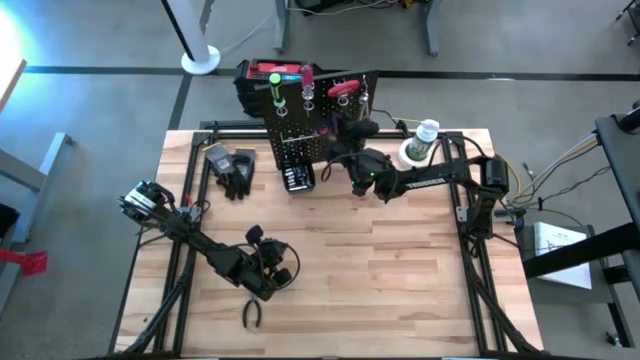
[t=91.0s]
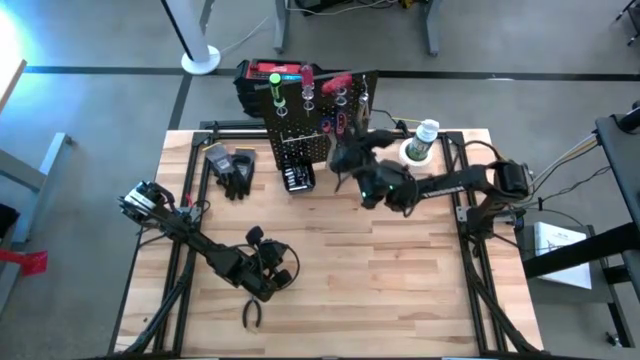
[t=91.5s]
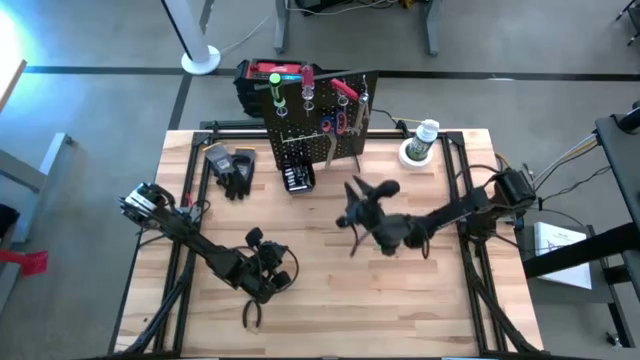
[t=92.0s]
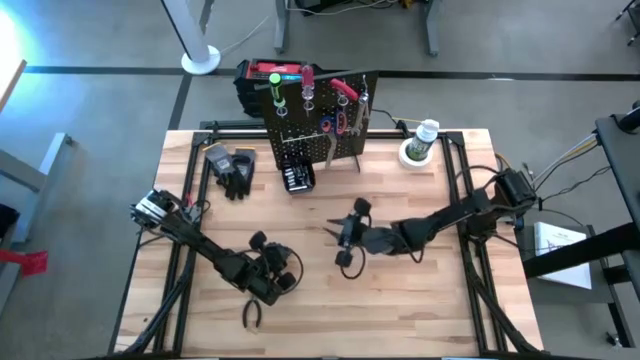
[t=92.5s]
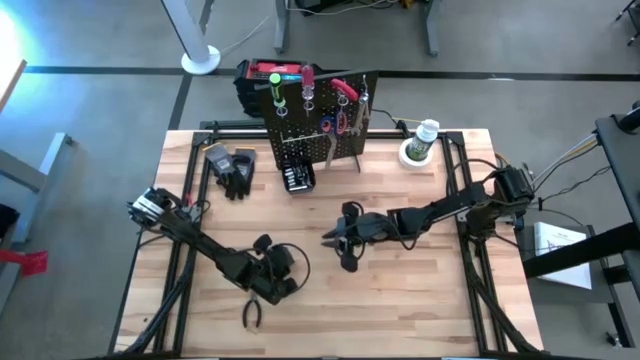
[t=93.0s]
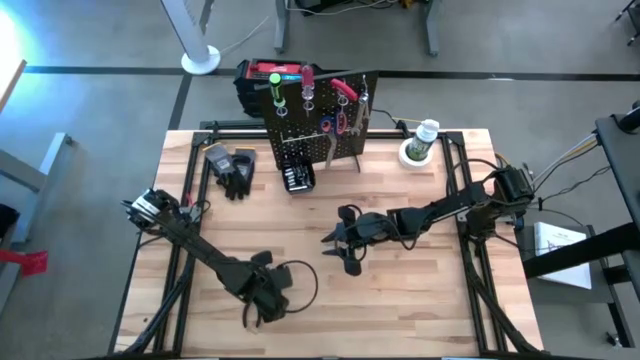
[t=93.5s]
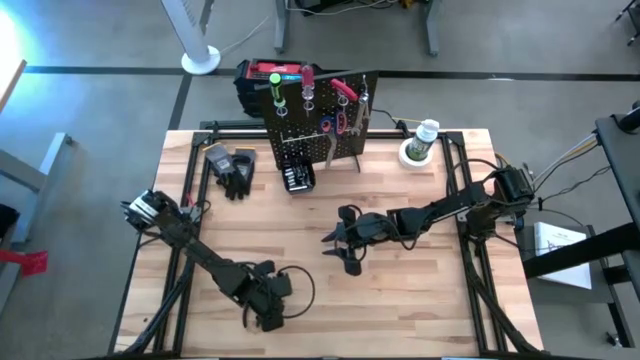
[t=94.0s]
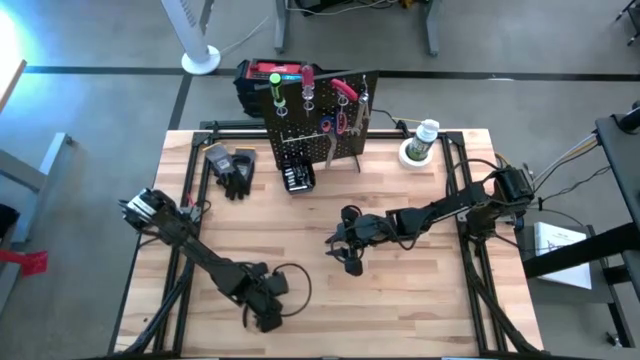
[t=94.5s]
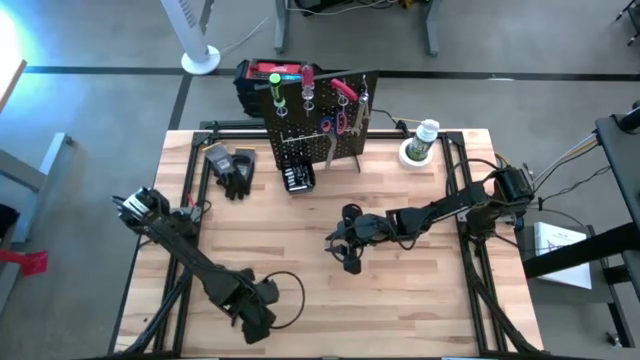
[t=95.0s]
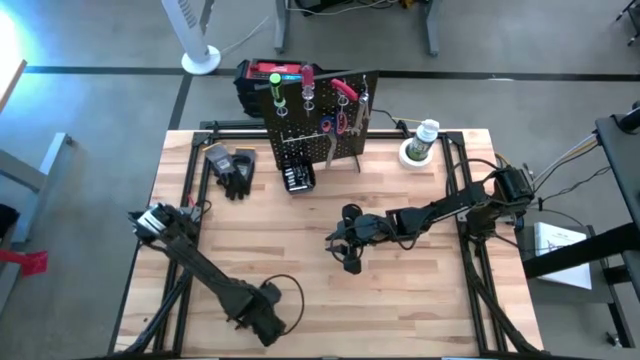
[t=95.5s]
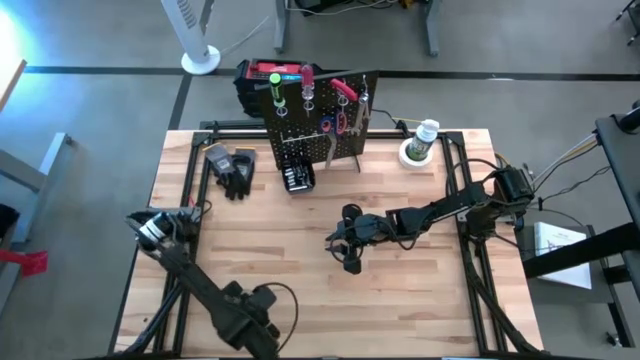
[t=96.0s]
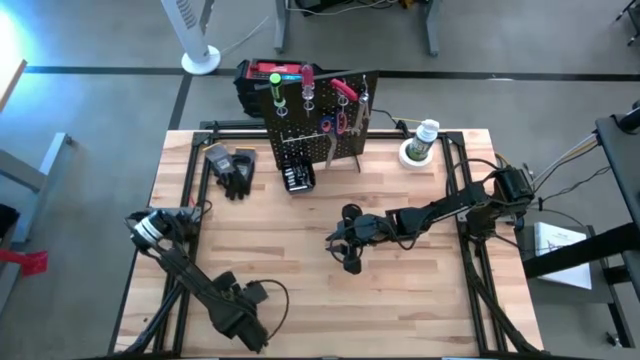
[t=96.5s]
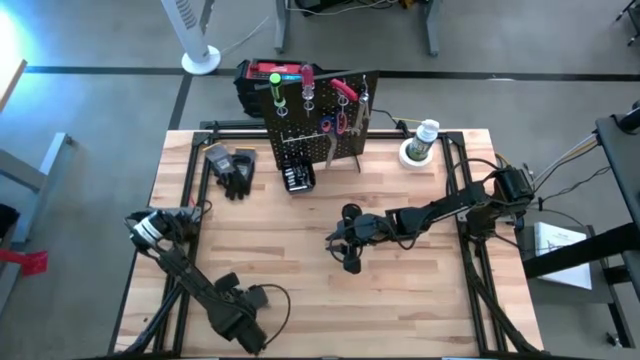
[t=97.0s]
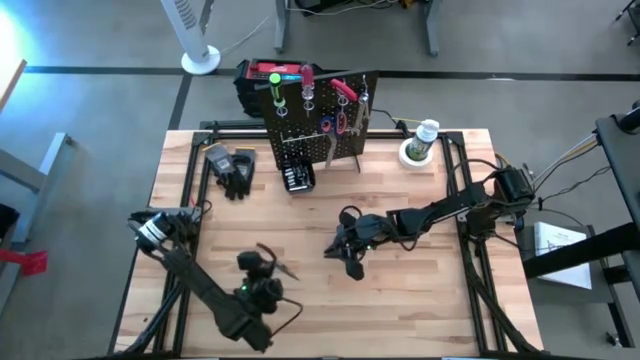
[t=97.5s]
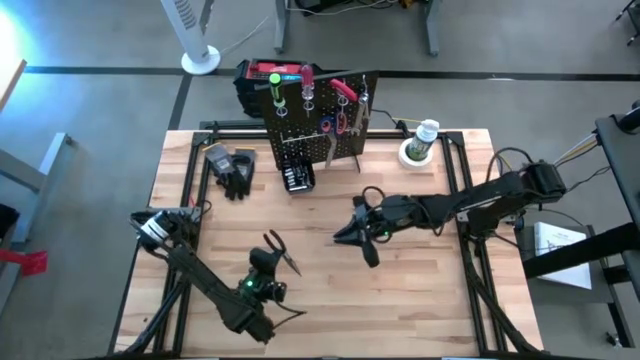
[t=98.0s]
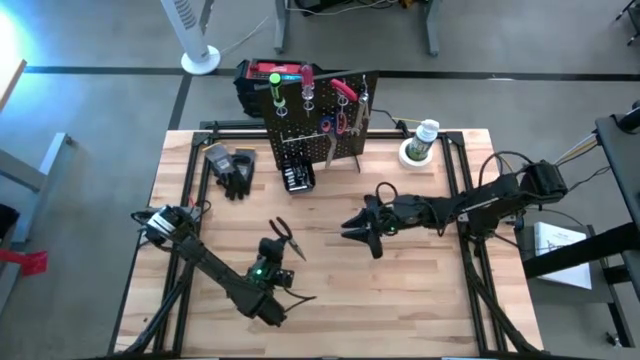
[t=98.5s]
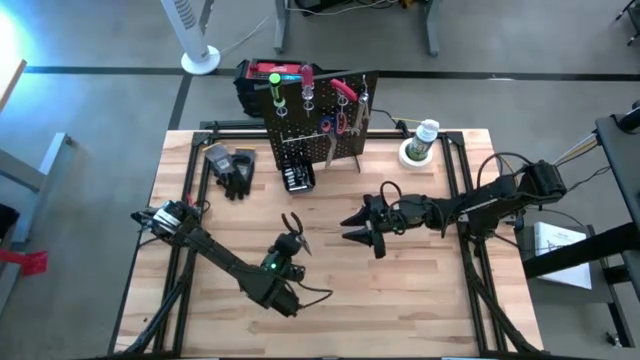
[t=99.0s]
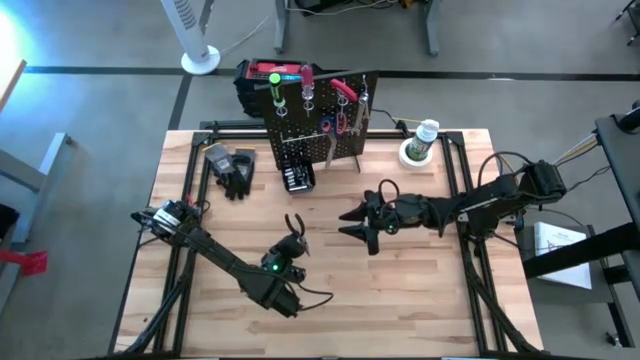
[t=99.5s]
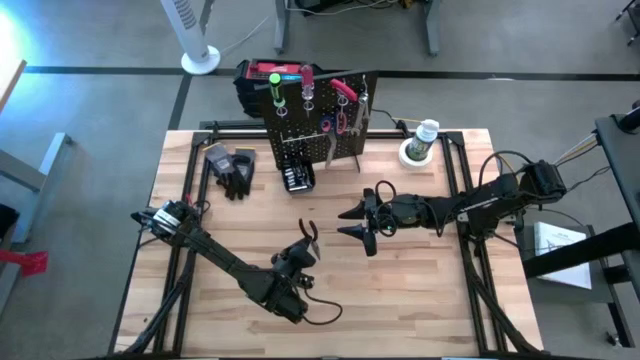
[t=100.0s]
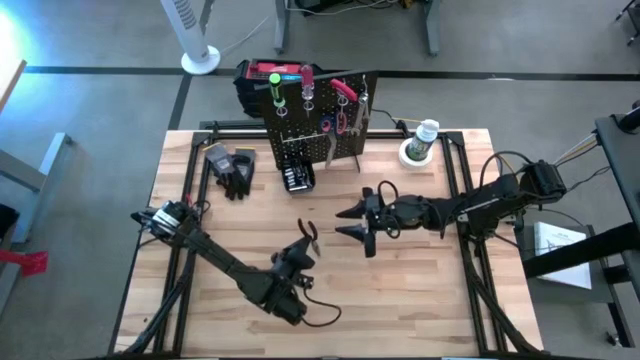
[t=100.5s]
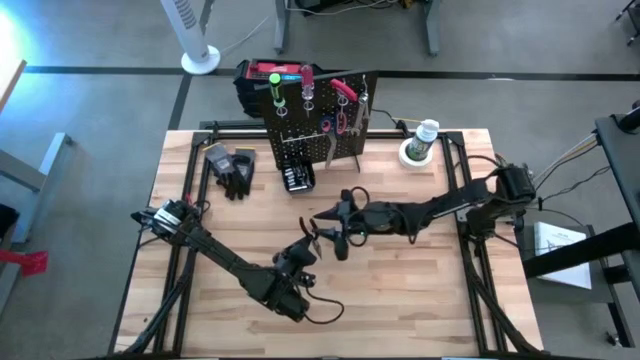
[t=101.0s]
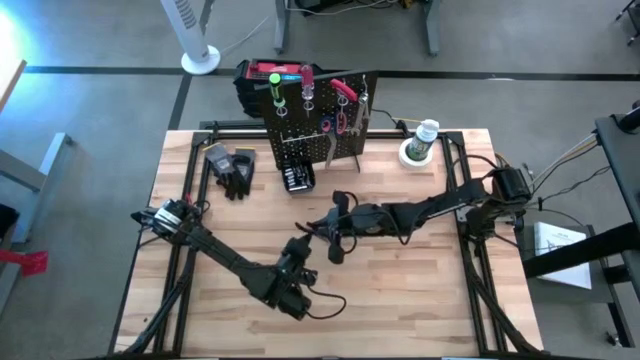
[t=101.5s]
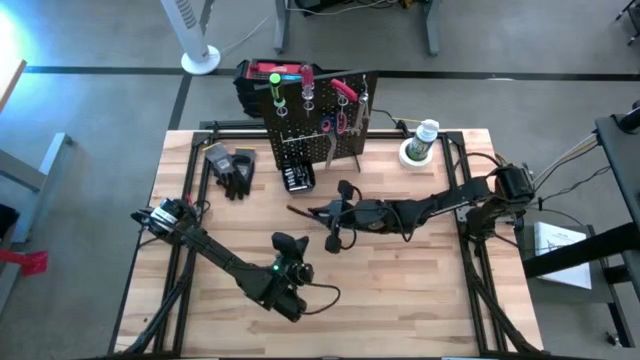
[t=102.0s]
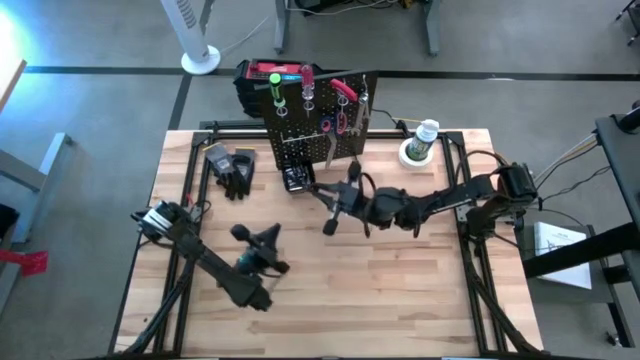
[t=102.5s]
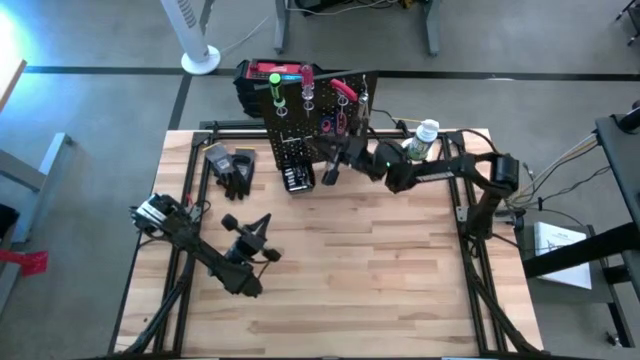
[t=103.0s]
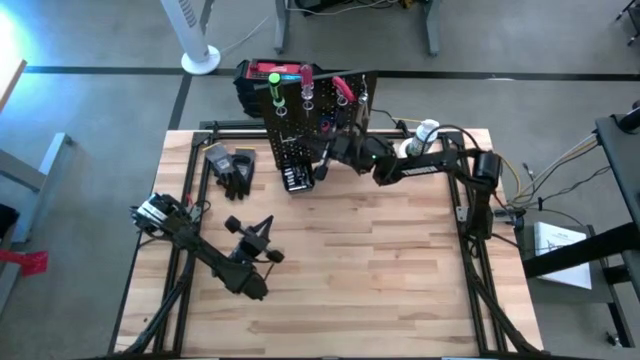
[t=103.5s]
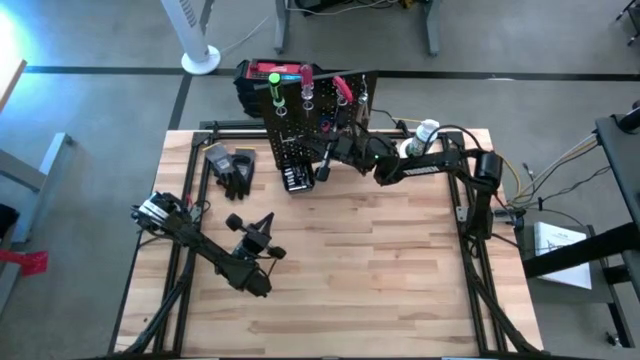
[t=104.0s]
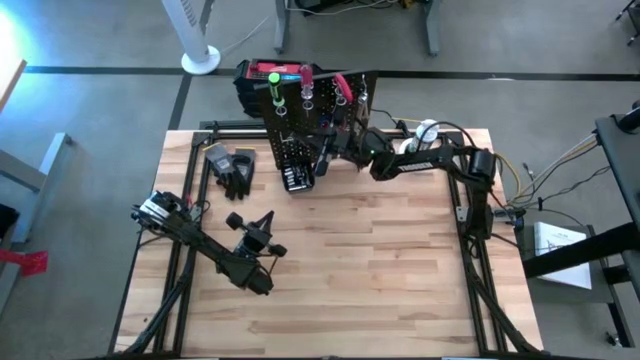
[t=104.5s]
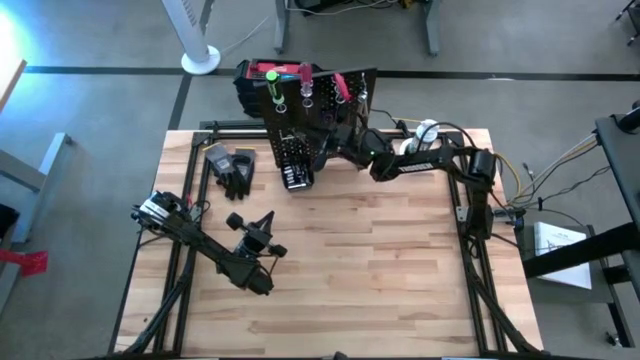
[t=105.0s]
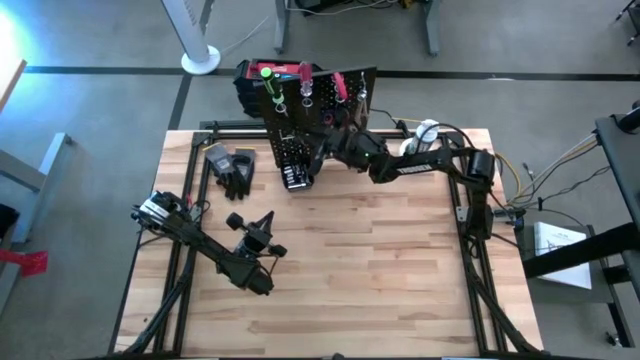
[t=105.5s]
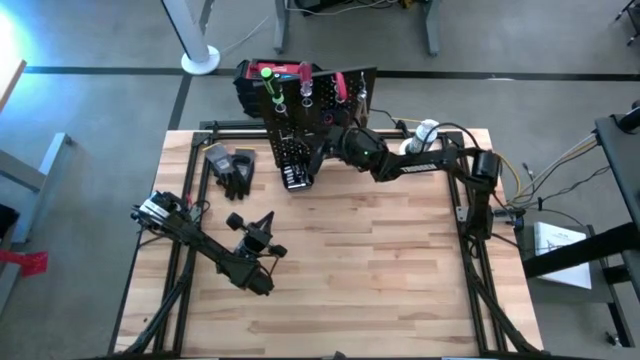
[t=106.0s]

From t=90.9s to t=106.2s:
Task: Hang tools onto peg board
Hang the black pliers on the pegboard

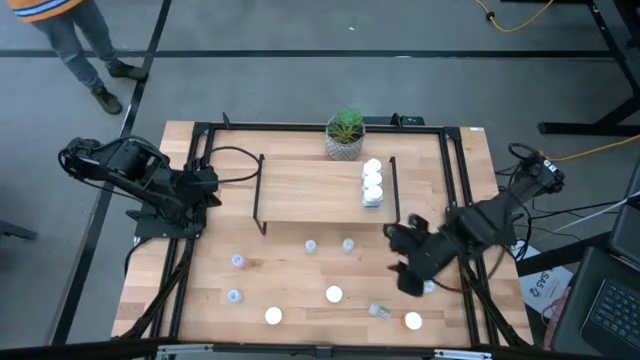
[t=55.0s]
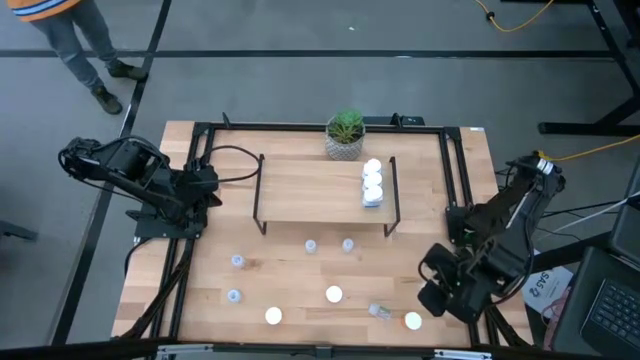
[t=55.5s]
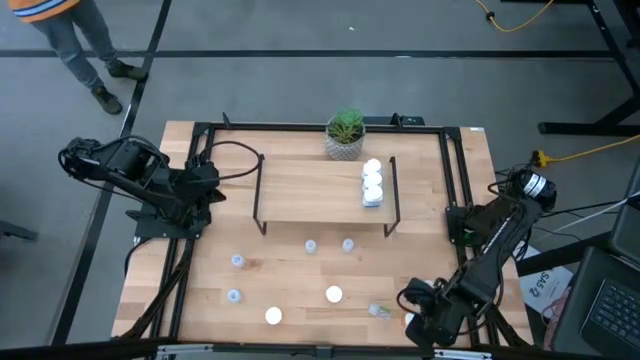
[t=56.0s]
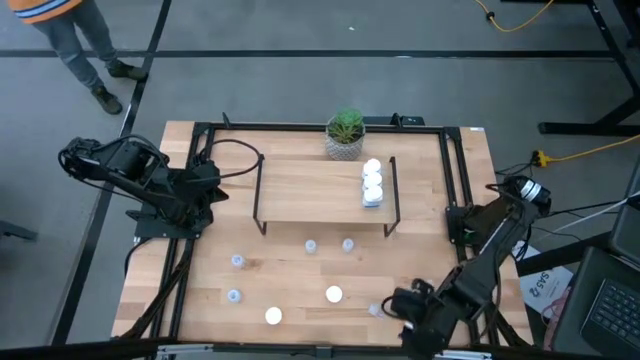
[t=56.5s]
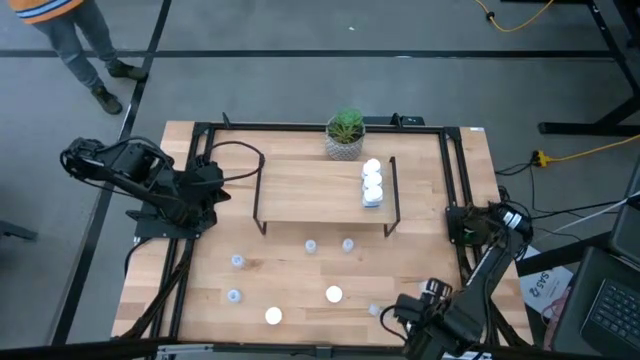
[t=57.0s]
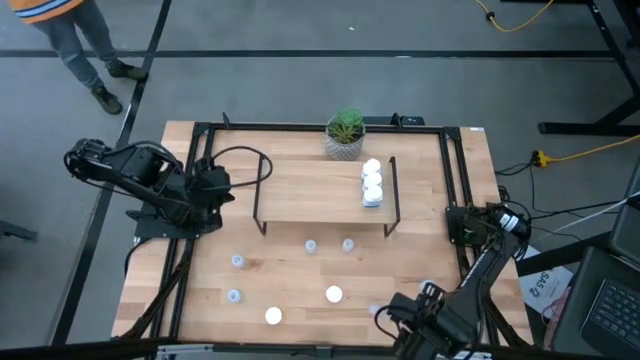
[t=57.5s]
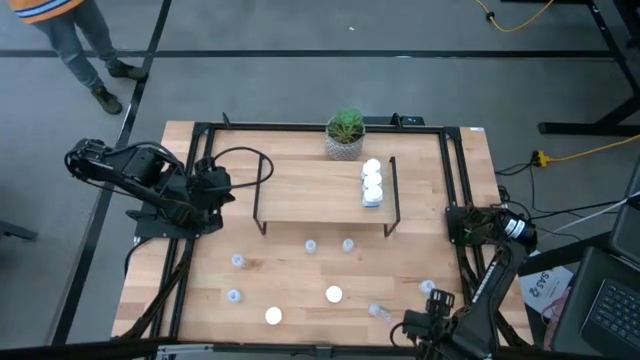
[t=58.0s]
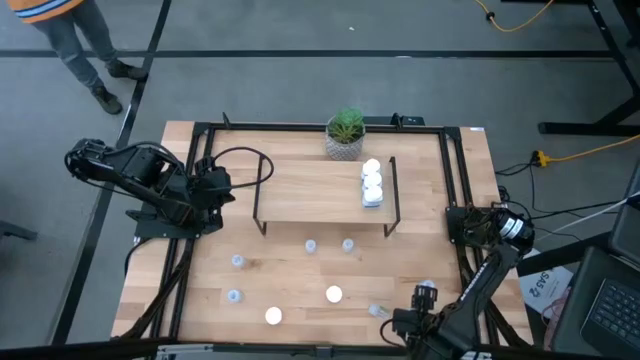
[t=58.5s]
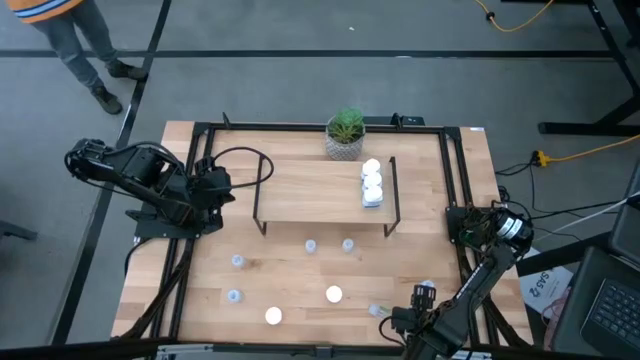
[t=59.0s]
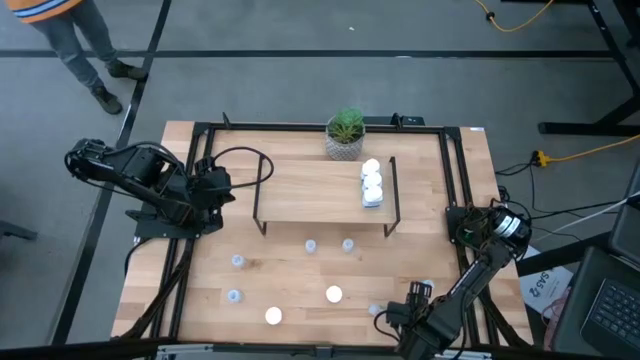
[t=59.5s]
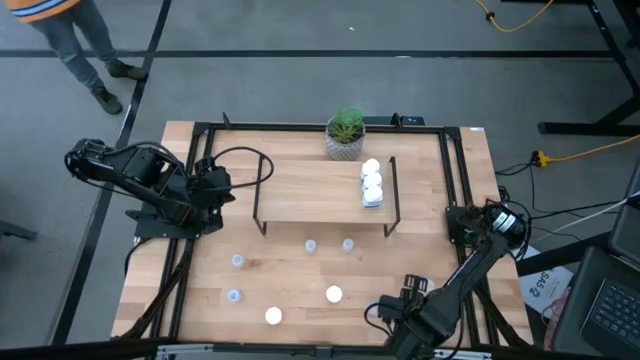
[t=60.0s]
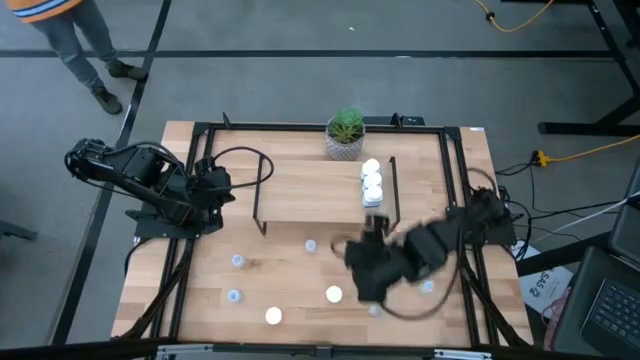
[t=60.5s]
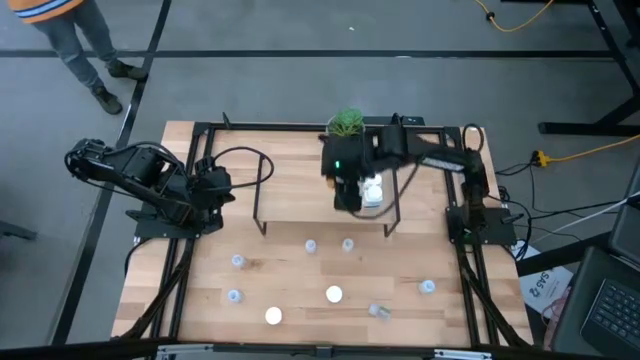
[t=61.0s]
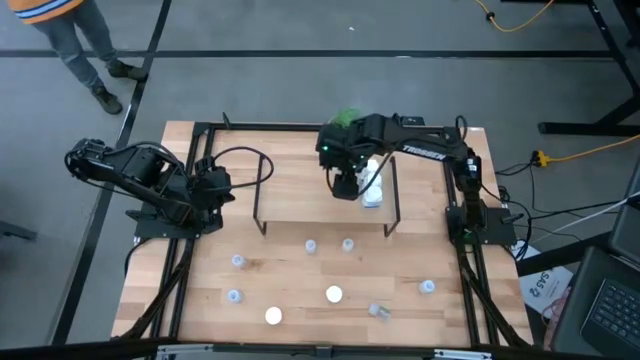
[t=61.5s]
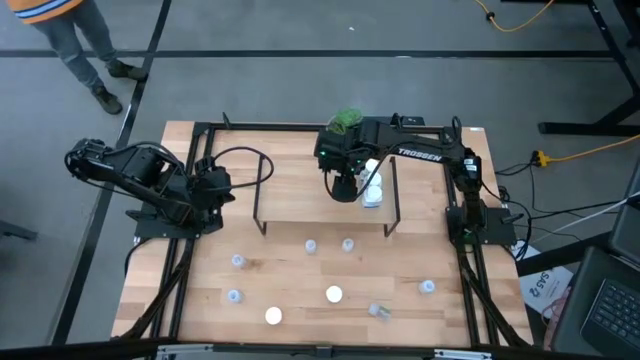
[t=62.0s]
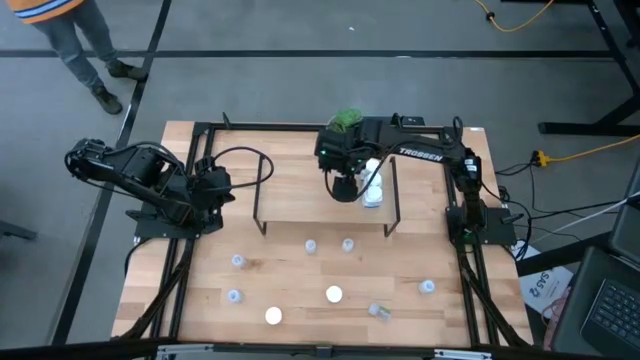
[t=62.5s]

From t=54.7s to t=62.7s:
Task: Pick and place medicine bottles onto shelf by color
Put the bottom right orange pill bottle on the shelf
